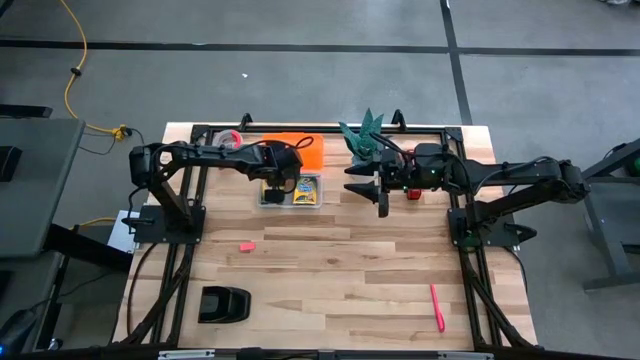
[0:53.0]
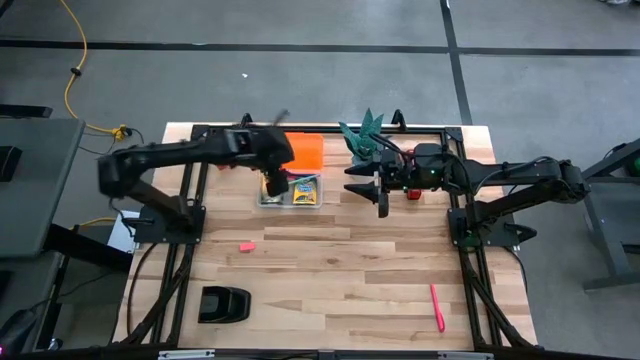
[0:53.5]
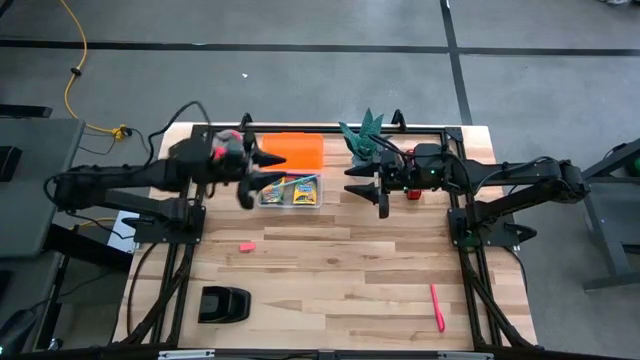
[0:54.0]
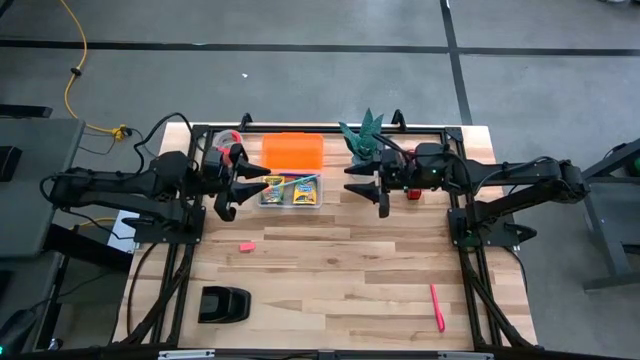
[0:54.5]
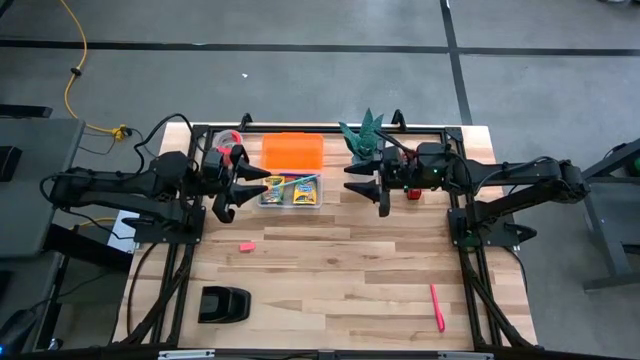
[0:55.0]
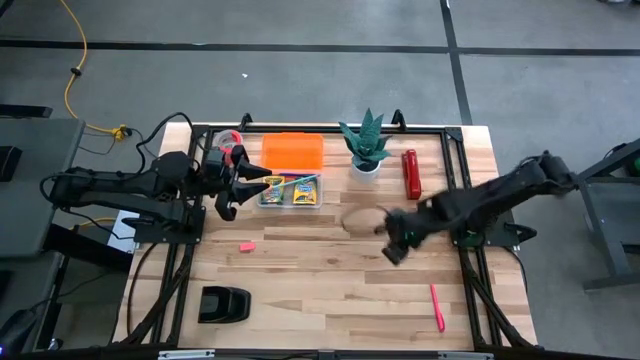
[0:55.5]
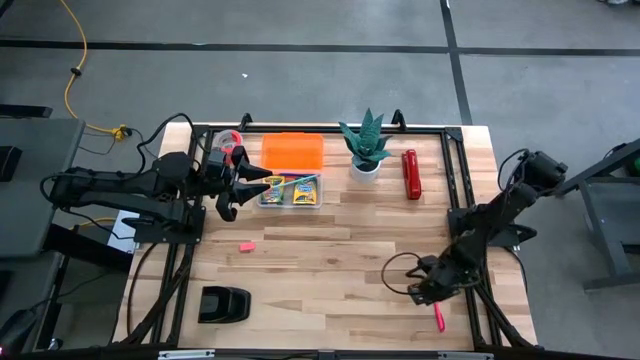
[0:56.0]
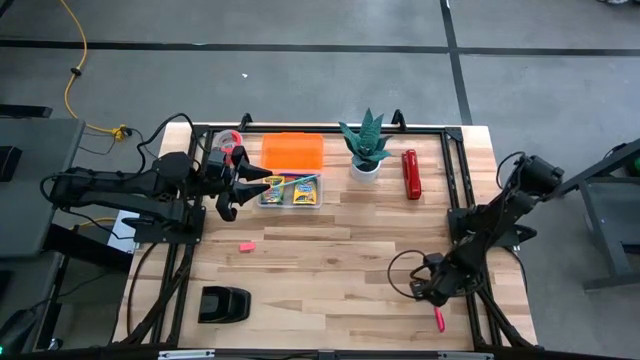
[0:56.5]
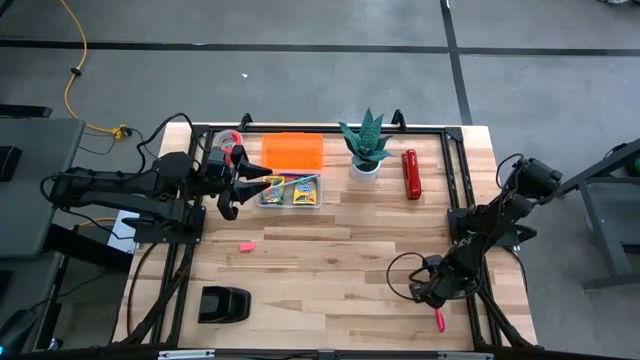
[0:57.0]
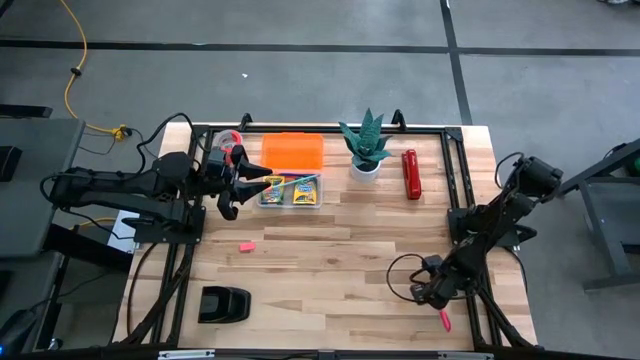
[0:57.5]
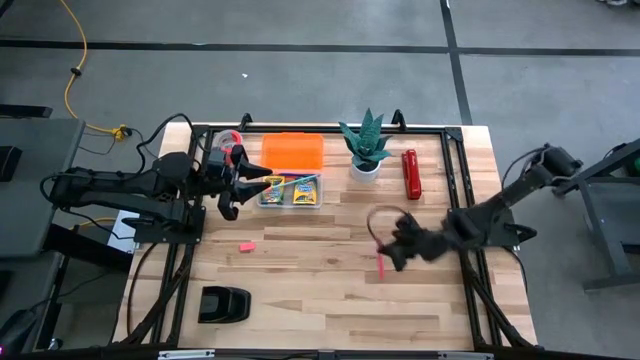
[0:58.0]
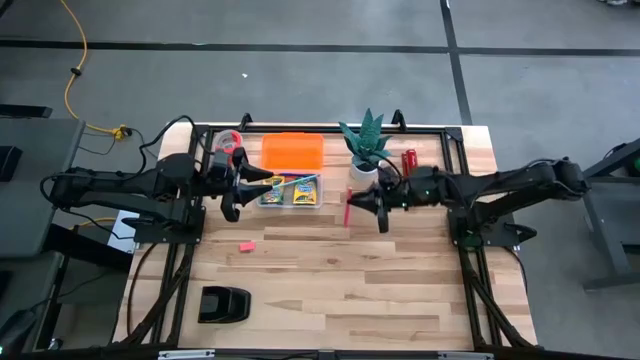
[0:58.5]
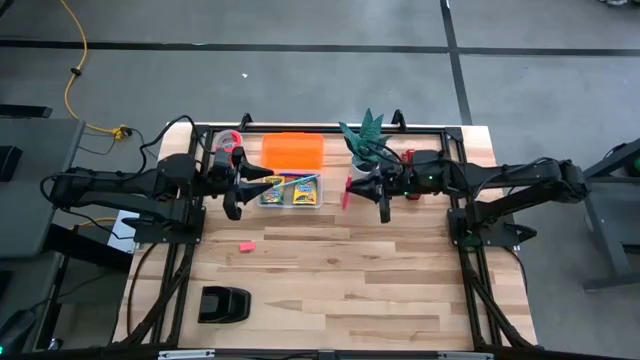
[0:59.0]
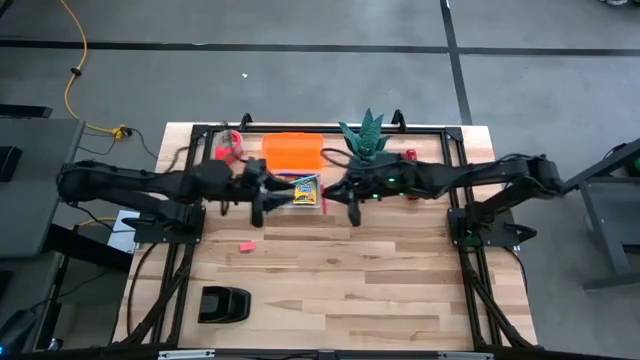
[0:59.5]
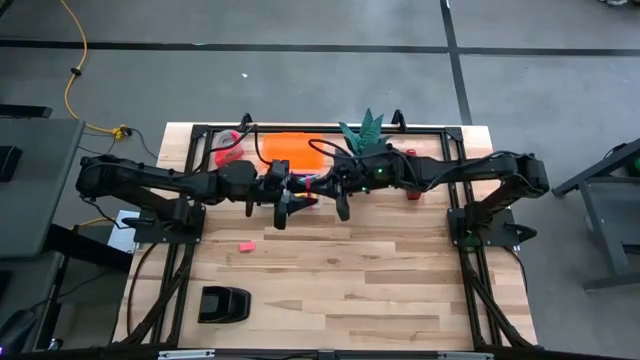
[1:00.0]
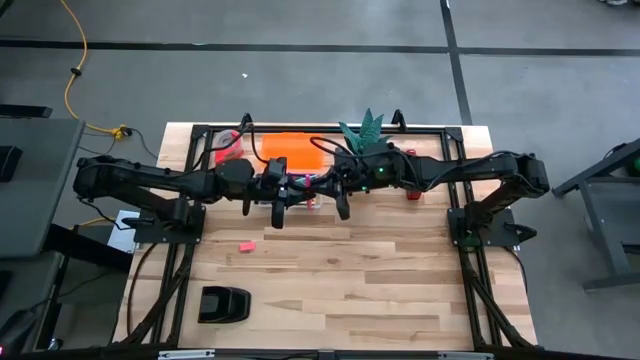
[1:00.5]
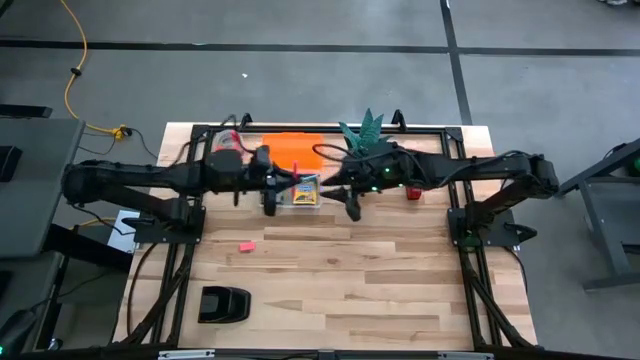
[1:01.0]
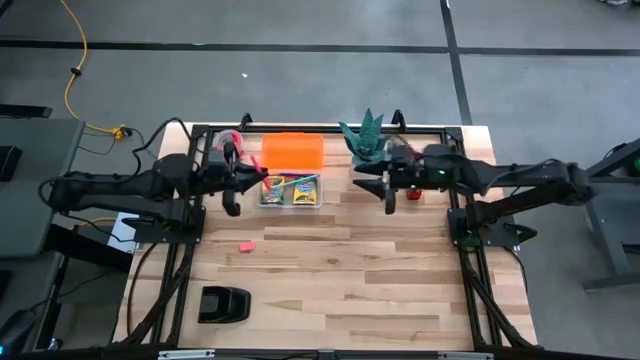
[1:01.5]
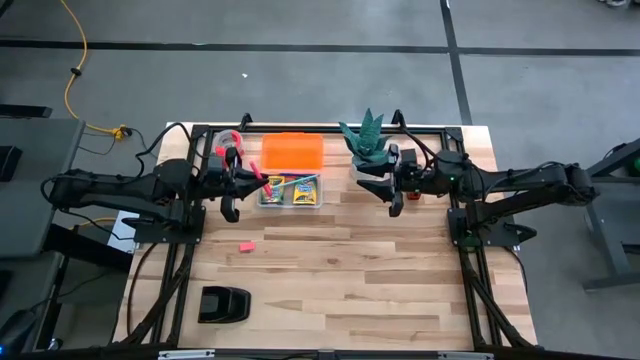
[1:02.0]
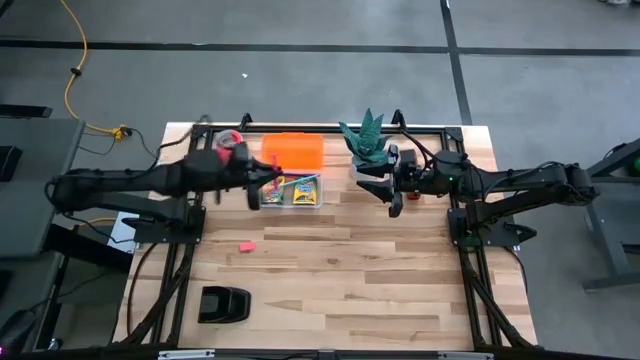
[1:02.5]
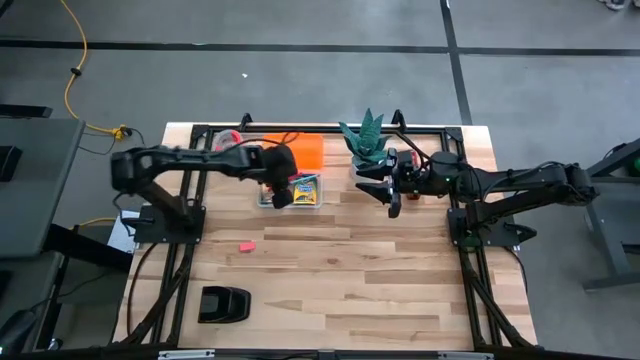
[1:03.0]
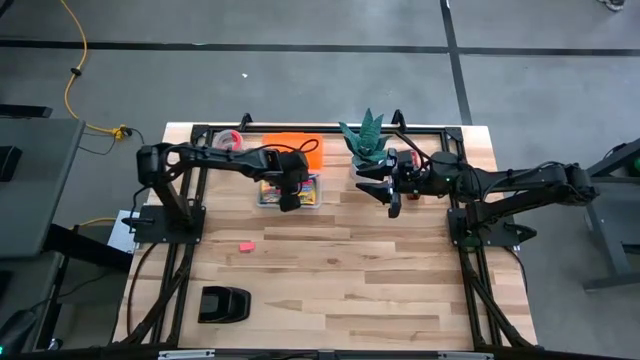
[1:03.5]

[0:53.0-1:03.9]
Task: Pack school essentials
Put the pink pen into the orange supply box

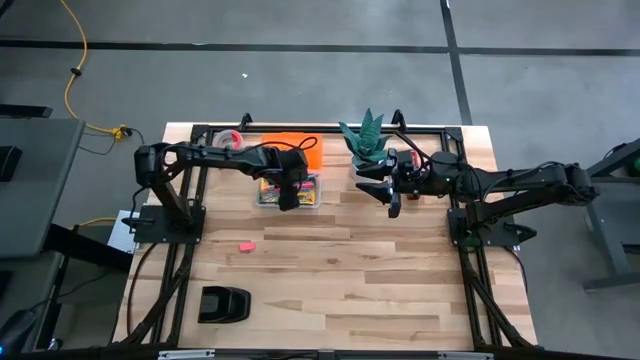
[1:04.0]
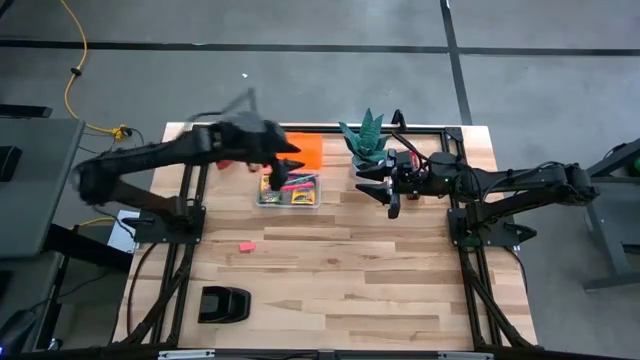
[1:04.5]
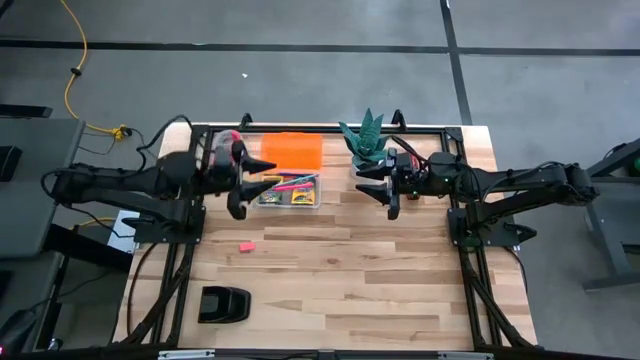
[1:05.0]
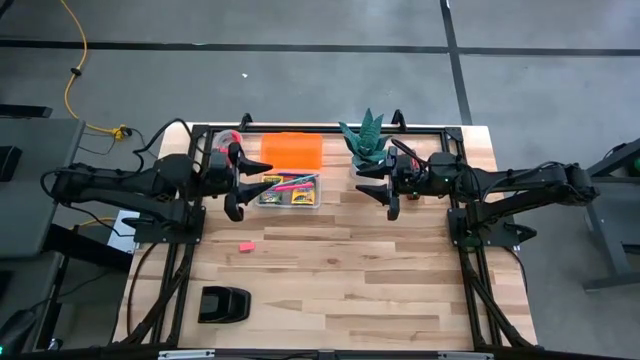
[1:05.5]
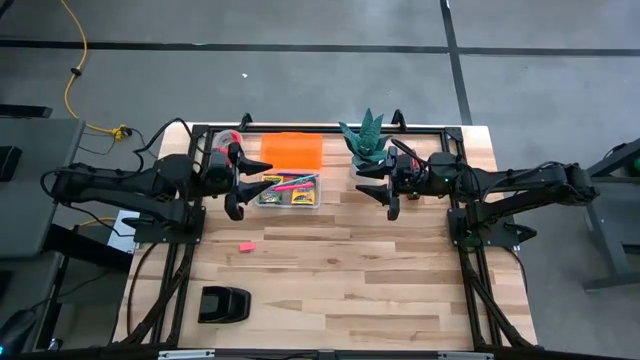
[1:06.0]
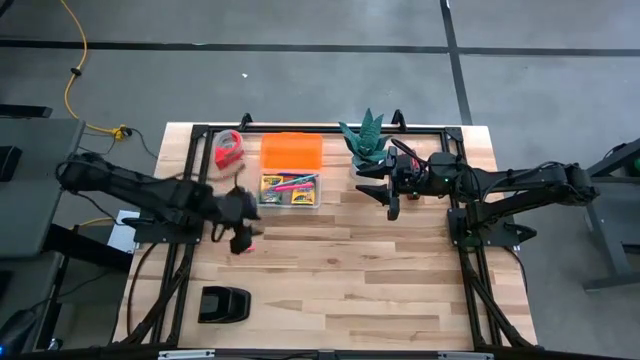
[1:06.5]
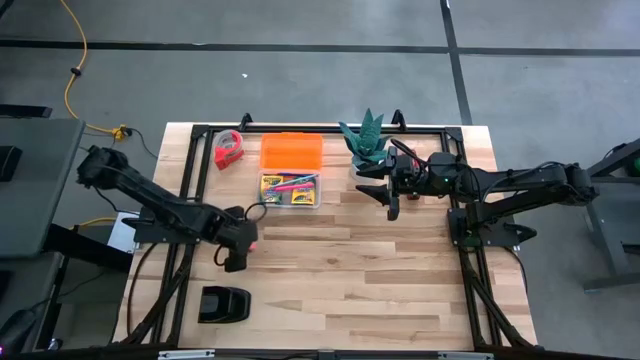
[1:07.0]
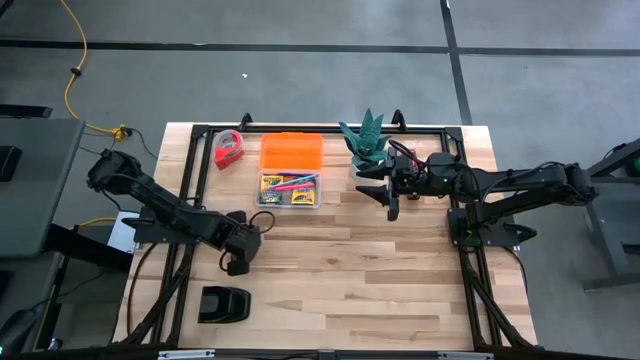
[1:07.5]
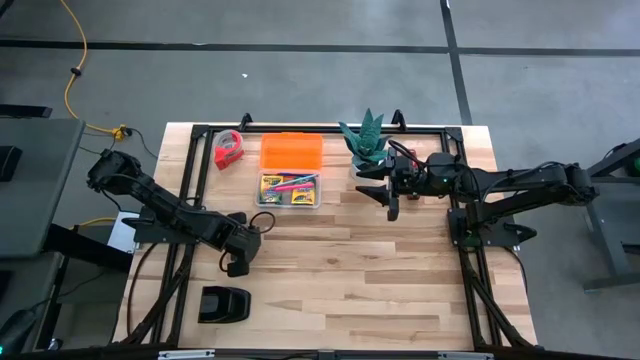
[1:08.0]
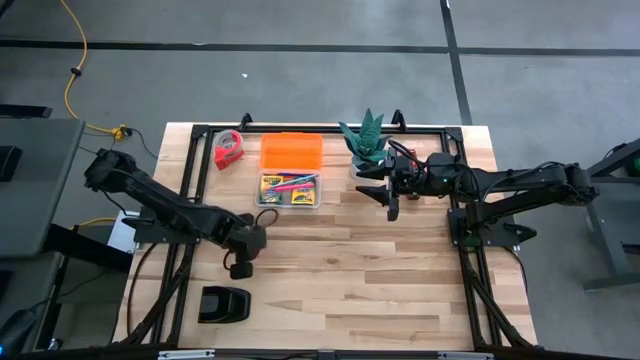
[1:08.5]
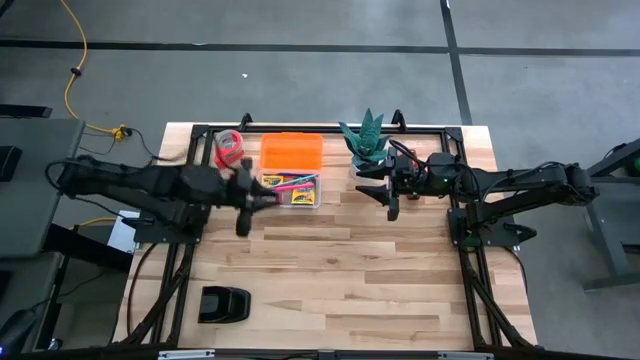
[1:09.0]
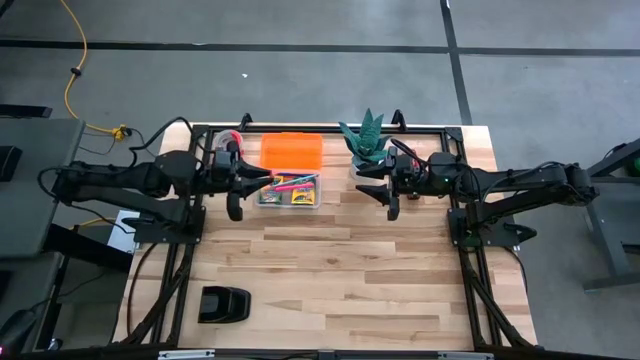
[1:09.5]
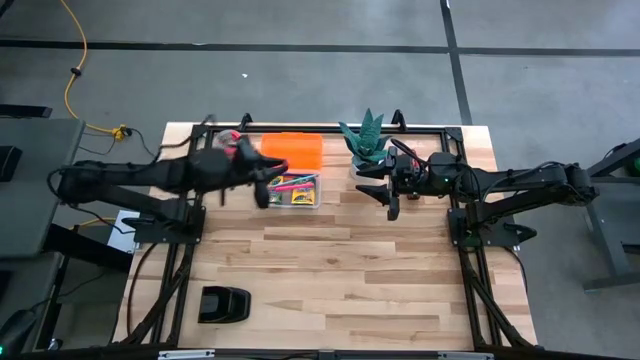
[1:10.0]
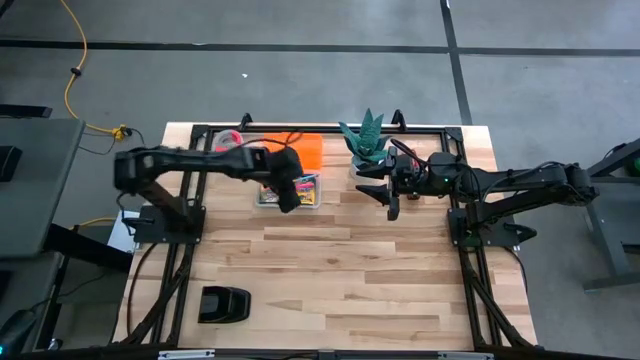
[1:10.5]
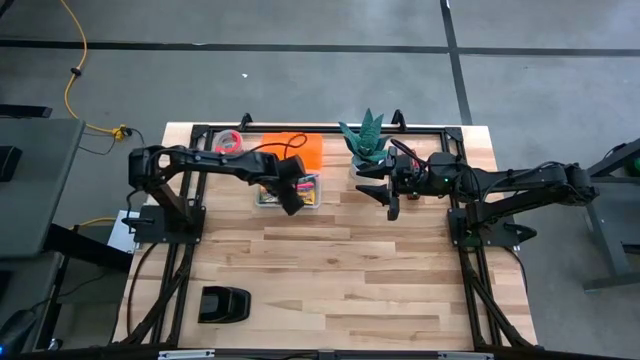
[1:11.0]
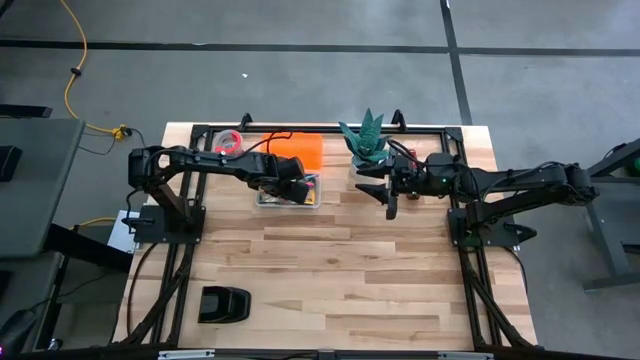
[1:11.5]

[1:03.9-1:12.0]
Put the pink eraser into the orange supply box

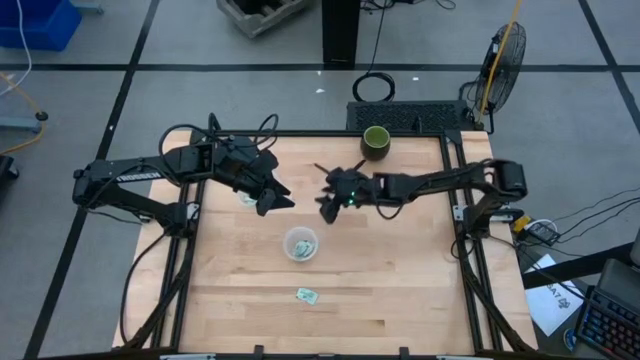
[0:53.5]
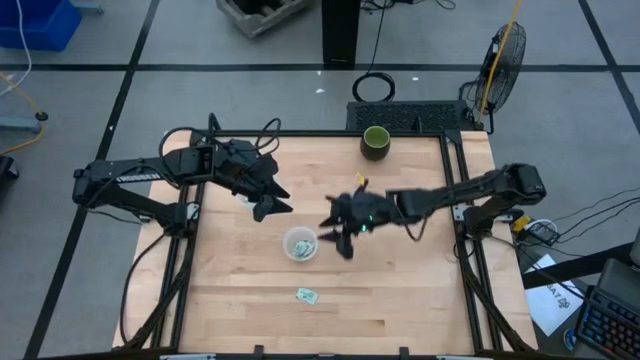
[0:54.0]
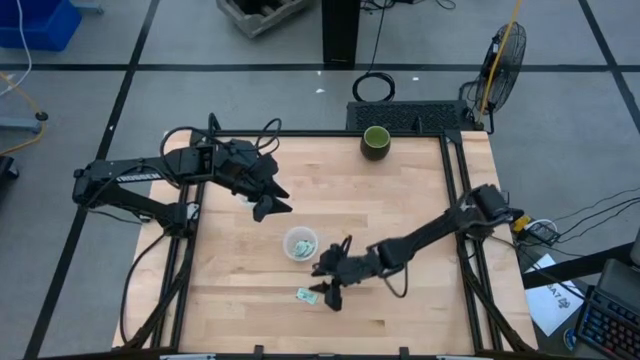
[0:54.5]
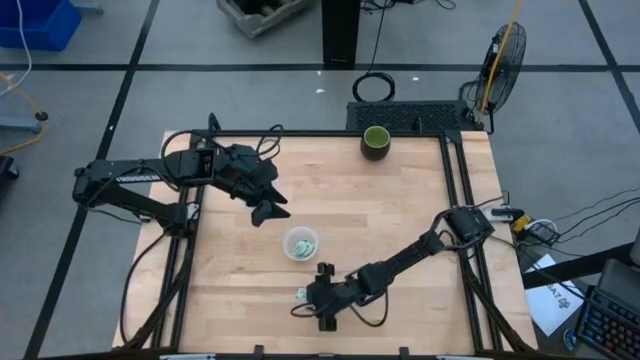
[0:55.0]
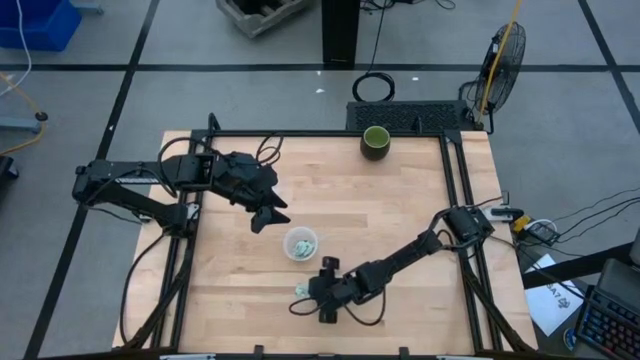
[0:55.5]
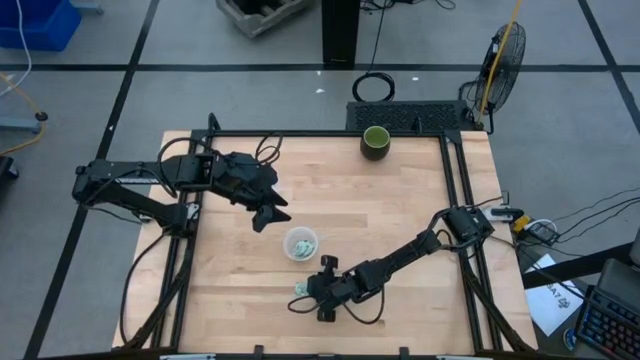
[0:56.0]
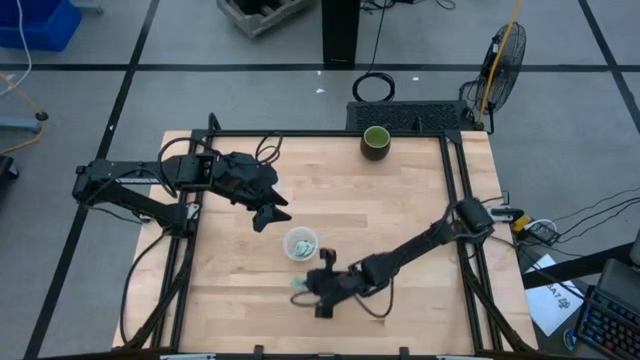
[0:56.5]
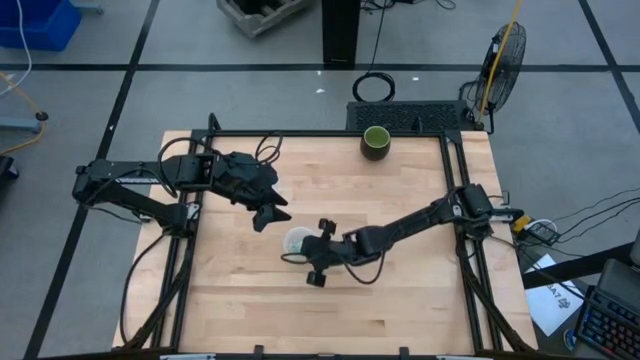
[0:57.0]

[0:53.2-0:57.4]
Task: Pick and place items into bin
Put the stevia packet into the left transparent bin
